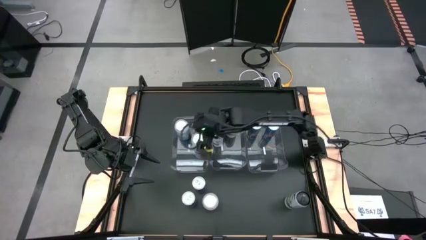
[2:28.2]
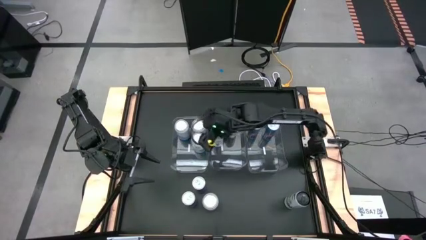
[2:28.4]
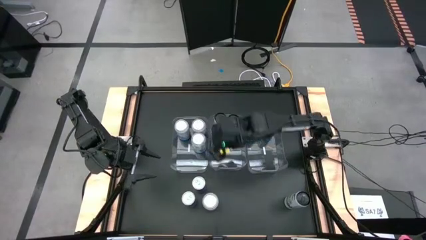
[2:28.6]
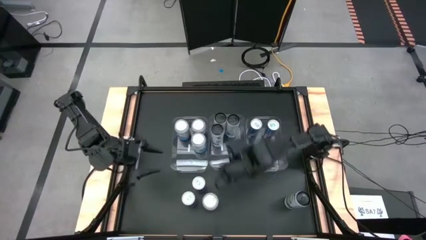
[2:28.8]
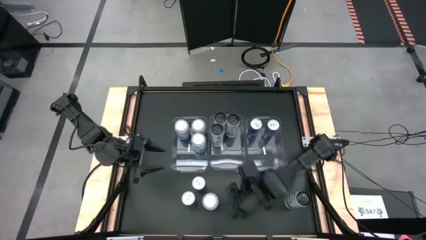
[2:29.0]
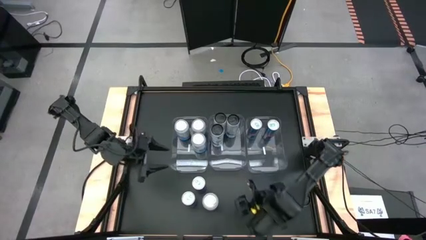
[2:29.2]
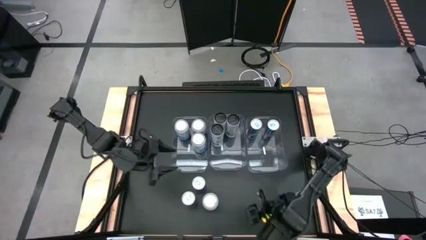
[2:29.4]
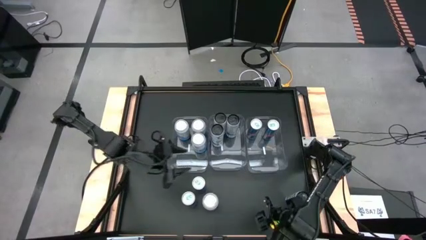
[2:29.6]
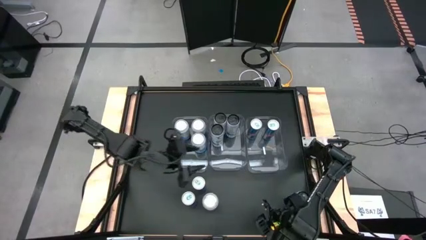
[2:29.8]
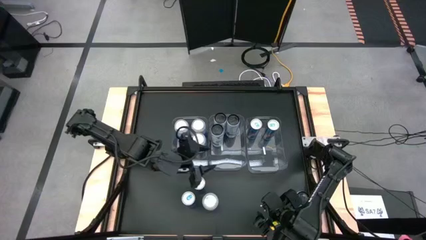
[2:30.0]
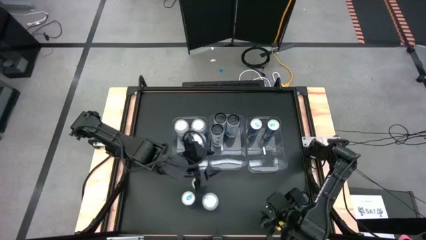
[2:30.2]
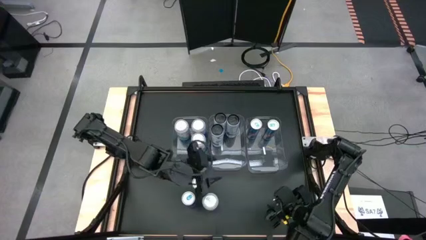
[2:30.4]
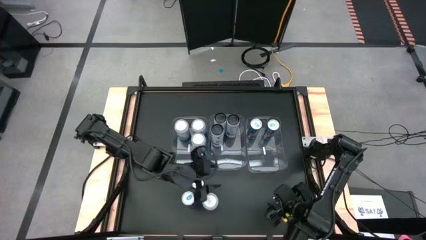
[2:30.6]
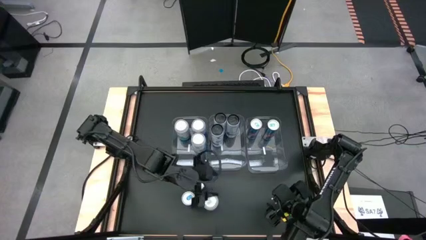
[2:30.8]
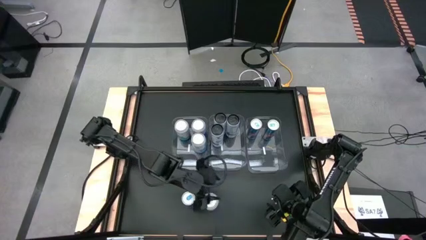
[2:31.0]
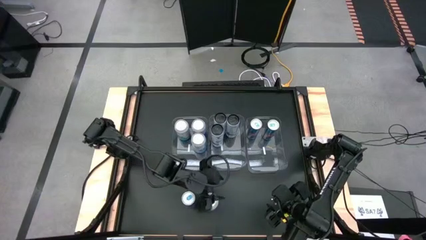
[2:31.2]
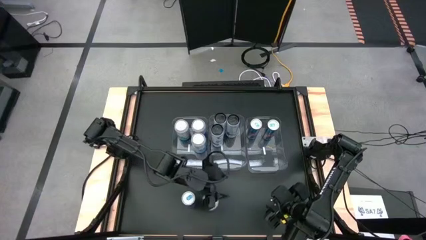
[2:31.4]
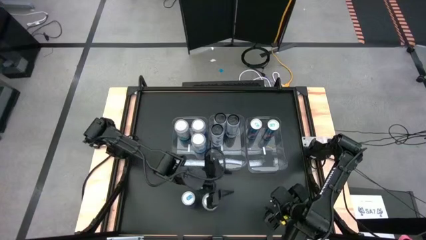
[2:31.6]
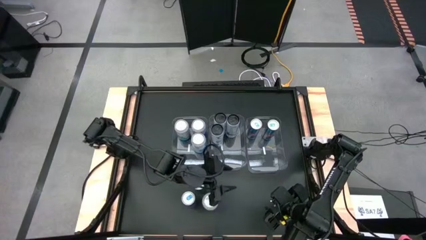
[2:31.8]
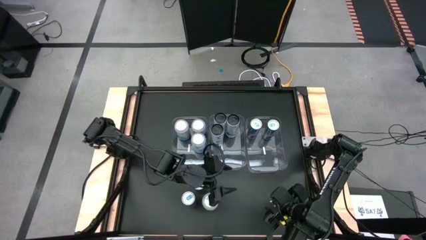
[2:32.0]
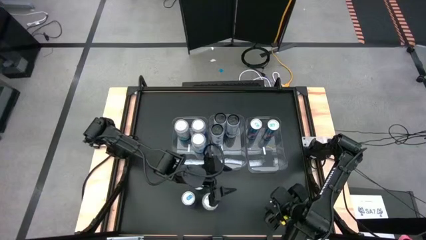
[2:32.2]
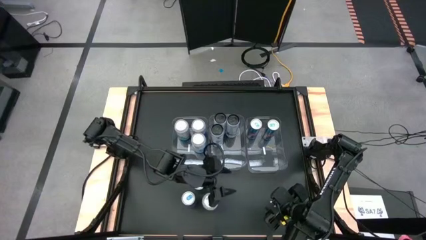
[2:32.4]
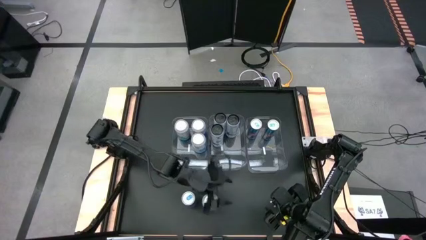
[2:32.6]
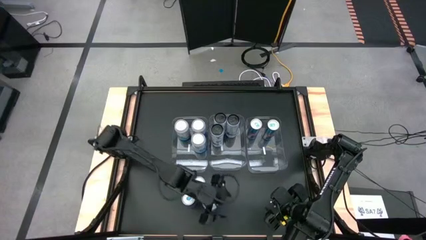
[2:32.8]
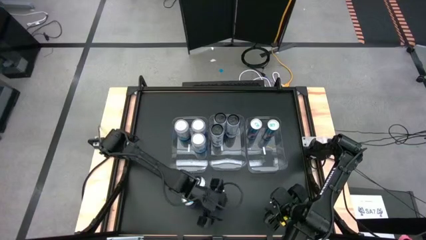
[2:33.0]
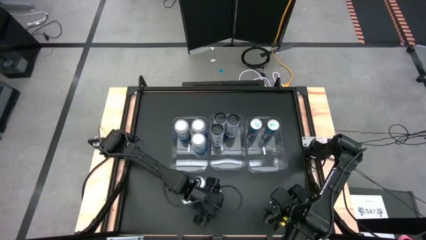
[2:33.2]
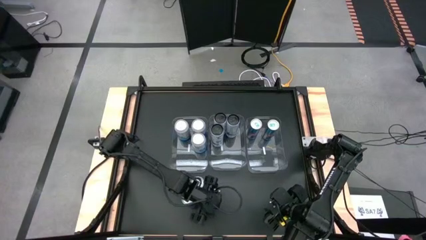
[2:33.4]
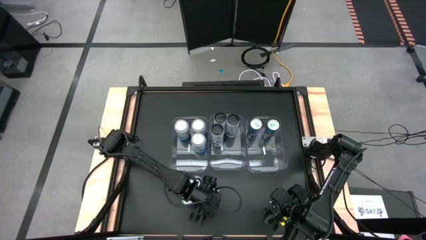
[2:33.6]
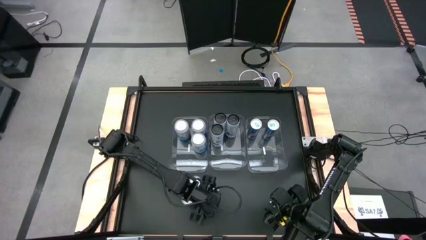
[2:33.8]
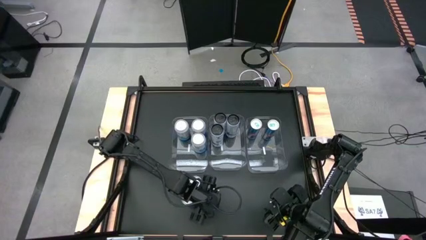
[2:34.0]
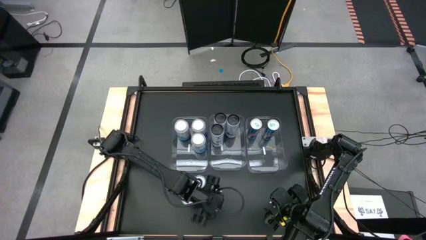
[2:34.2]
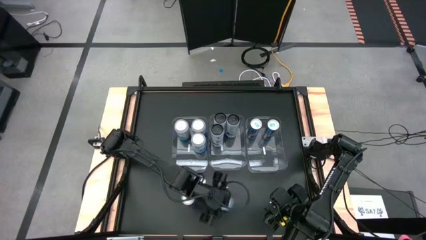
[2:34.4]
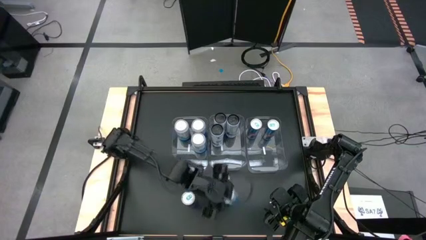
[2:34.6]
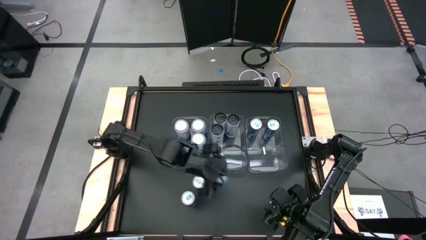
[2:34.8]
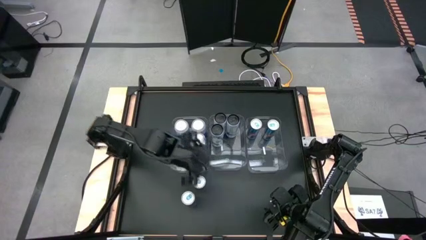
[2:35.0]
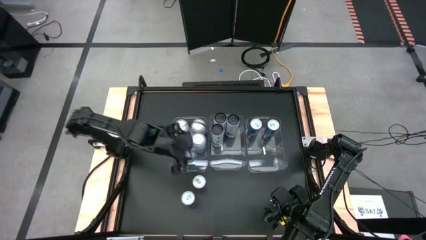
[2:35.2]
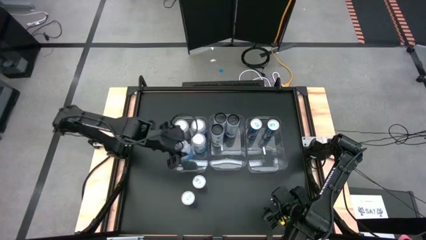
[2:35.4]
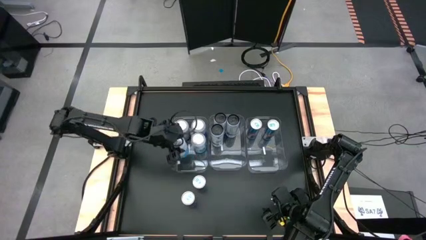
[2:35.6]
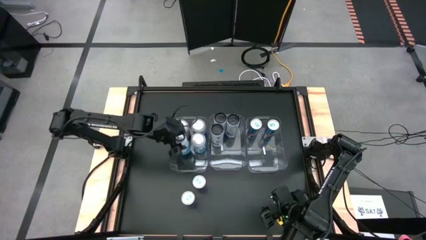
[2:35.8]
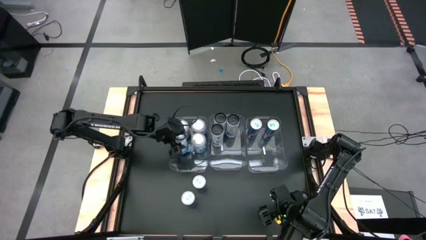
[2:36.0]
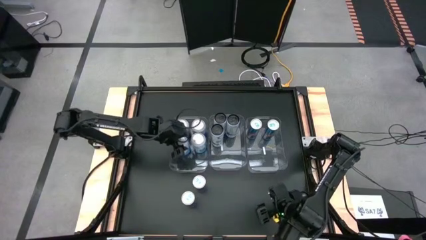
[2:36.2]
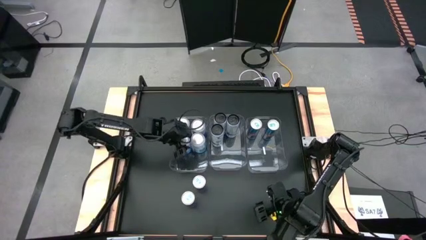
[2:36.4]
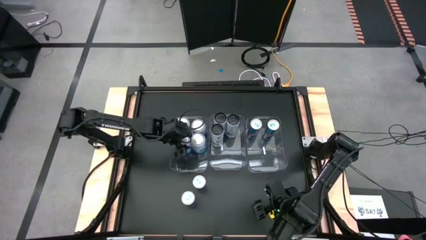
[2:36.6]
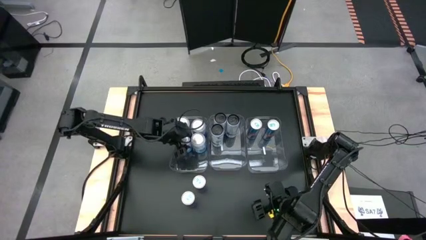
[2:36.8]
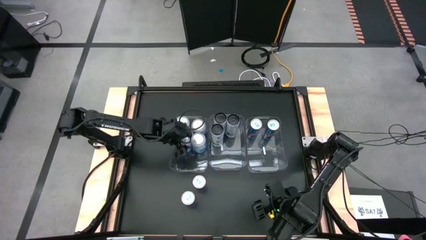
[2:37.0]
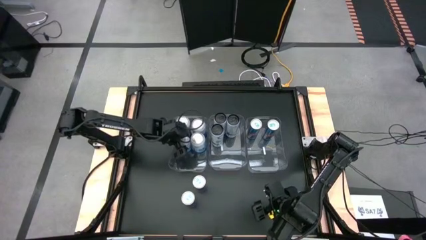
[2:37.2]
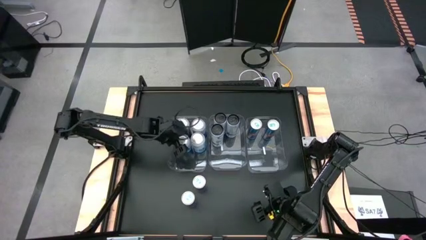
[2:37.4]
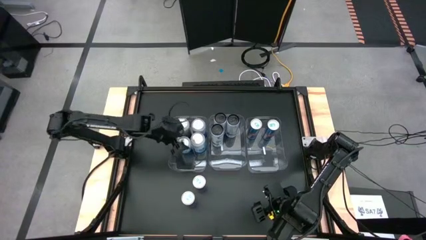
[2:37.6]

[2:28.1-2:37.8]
Task: Sort soda cans
Put the blue-white soda can into the left transparent bin

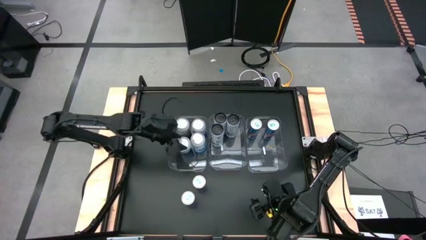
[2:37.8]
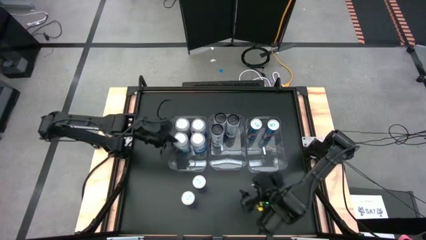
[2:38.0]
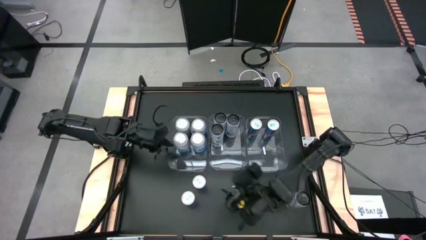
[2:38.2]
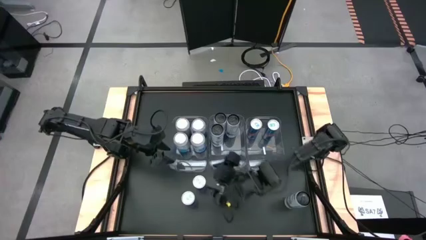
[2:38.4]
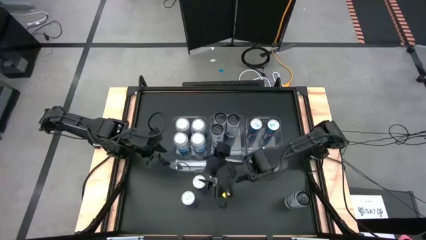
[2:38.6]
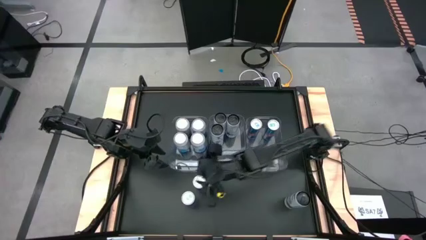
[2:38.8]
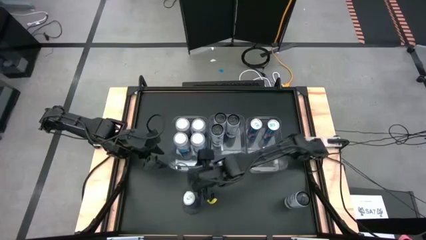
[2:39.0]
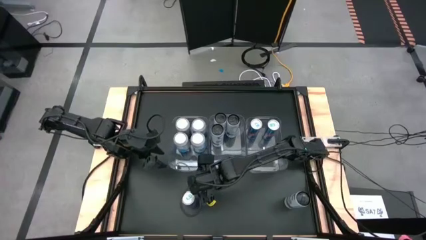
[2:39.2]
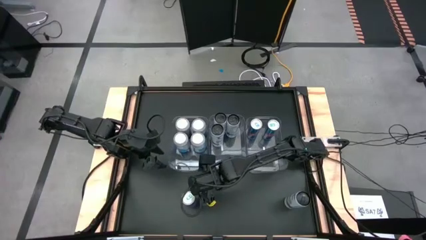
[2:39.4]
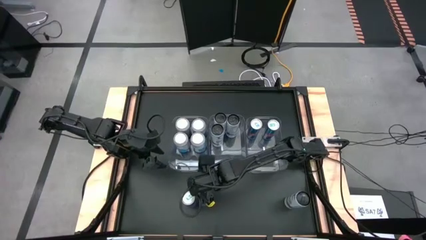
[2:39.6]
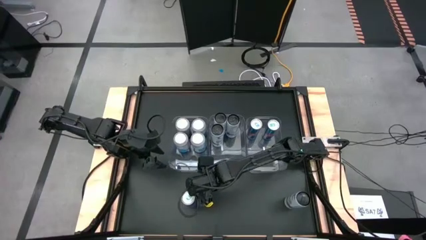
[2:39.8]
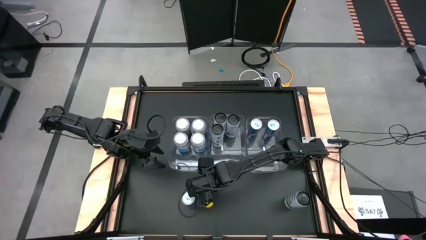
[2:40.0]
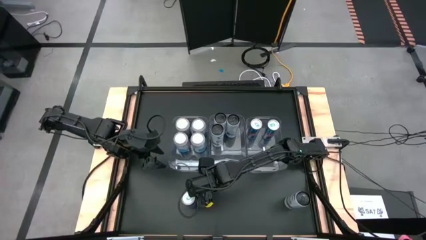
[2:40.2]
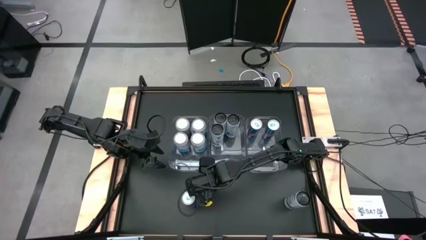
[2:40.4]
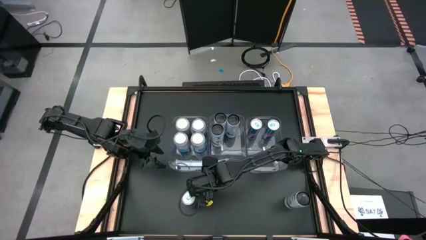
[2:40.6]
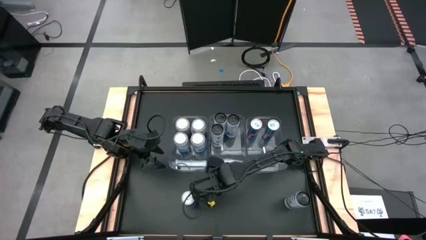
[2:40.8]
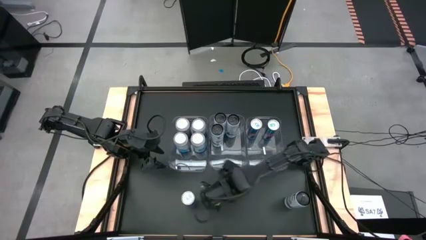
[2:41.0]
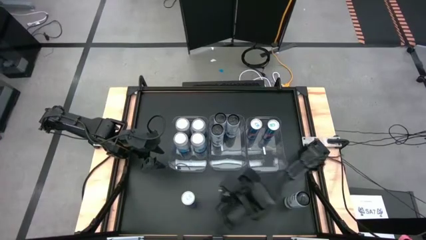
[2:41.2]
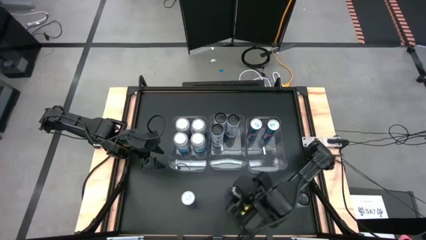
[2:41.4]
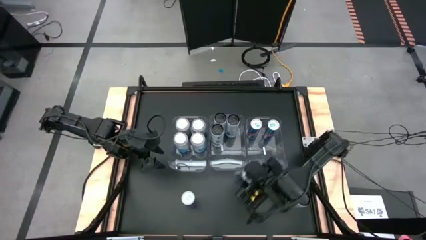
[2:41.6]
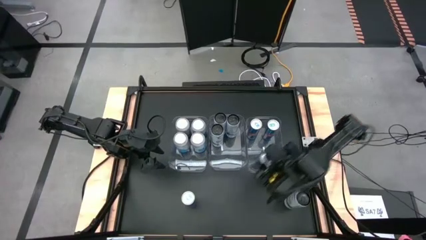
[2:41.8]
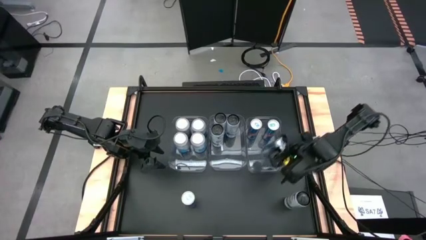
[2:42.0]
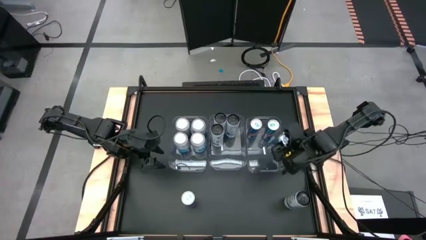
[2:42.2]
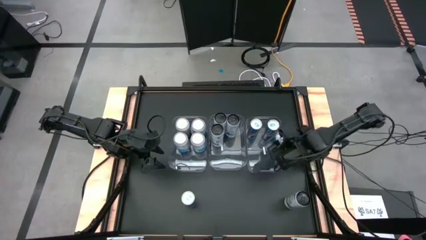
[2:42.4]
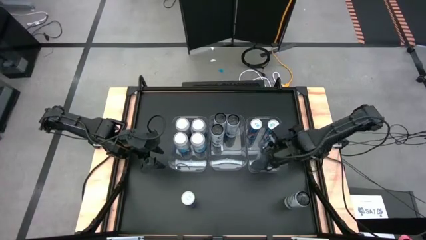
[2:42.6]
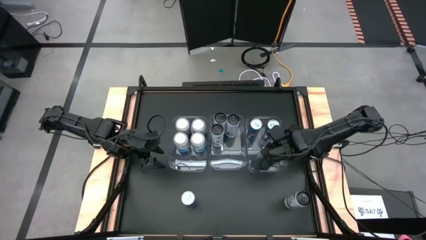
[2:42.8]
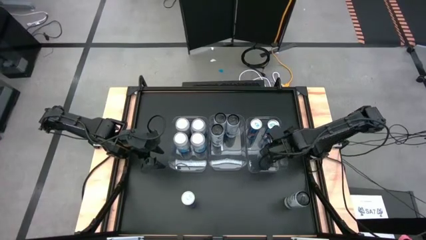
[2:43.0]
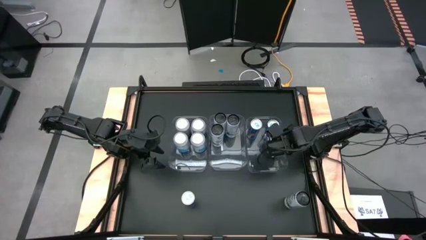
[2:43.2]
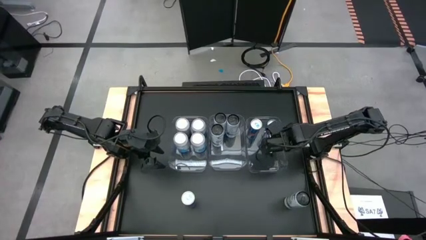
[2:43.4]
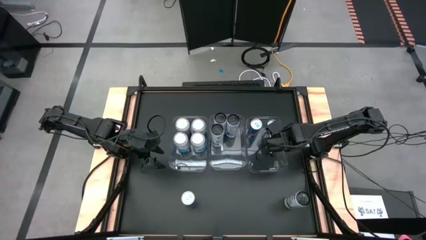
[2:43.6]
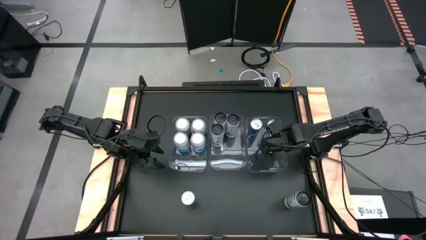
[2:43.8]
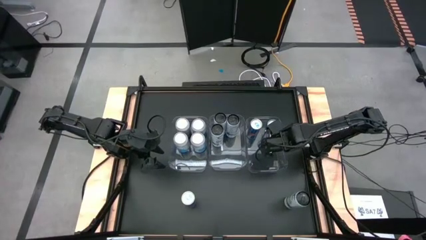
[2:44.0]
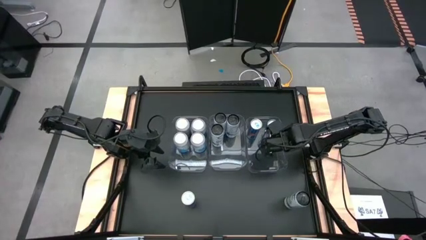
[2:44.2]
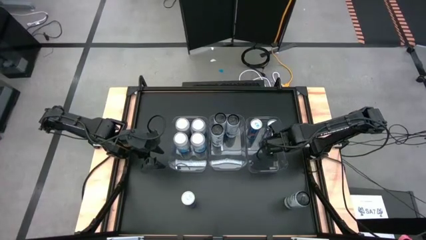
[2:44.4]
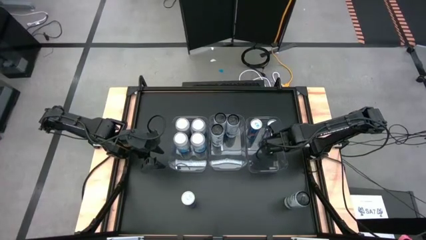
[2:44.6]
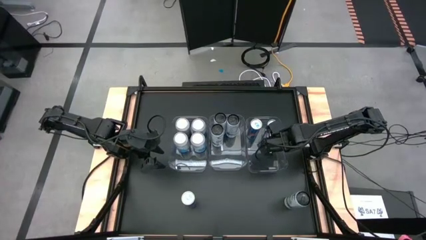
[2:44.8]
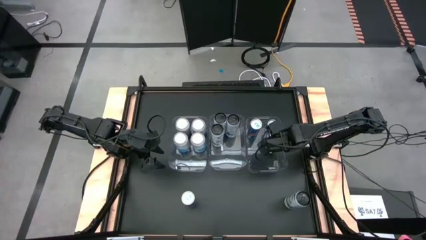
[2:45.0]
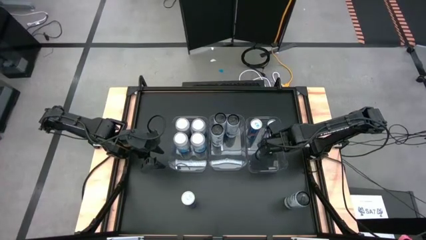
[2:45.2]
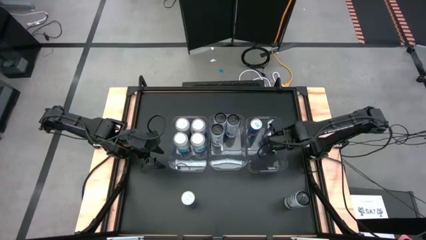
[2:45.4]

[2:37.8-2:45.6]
Put the top blue soda can into the right transparent bin
